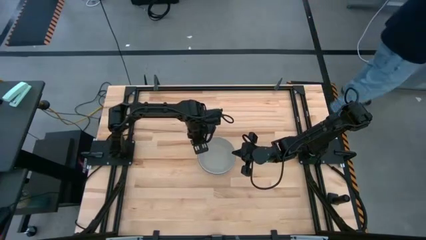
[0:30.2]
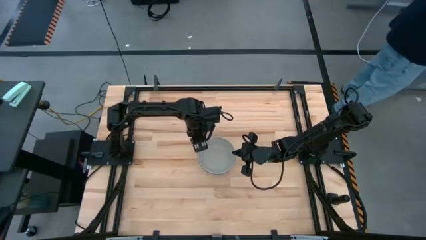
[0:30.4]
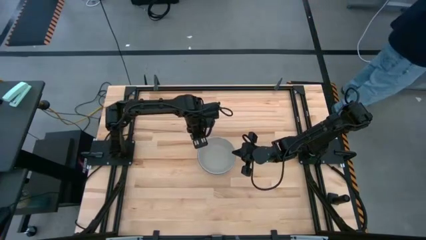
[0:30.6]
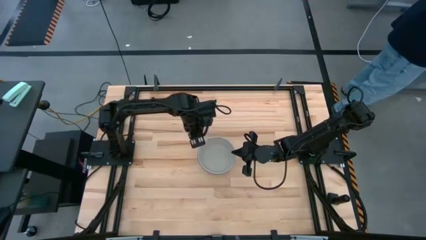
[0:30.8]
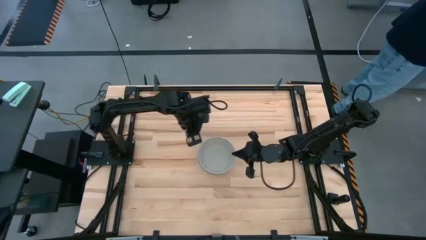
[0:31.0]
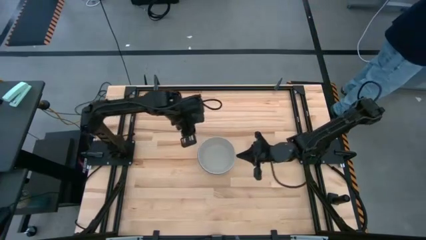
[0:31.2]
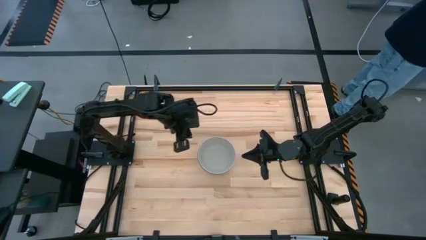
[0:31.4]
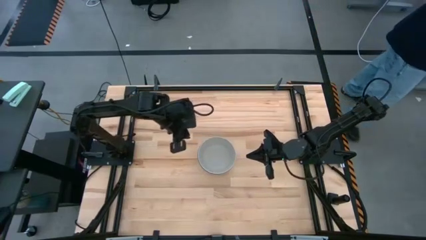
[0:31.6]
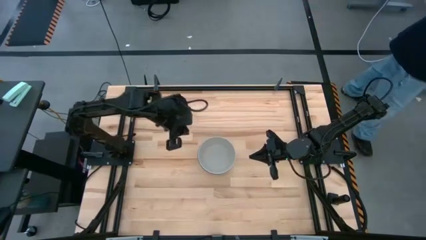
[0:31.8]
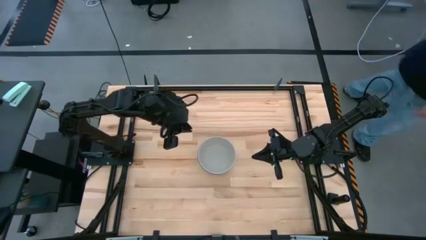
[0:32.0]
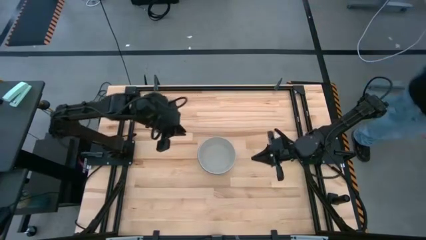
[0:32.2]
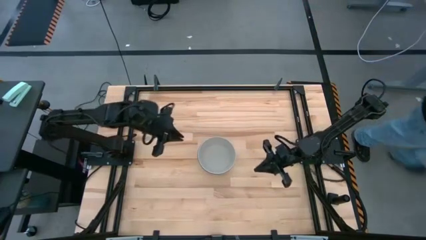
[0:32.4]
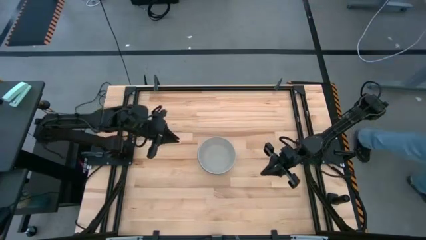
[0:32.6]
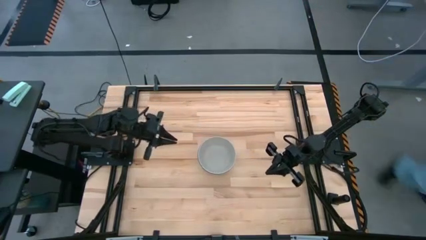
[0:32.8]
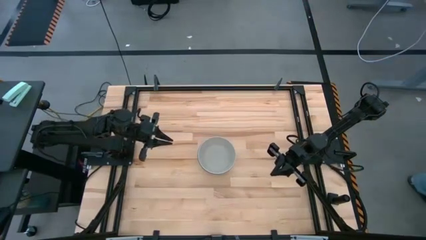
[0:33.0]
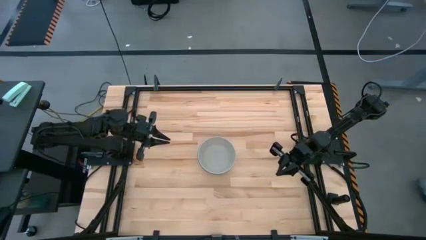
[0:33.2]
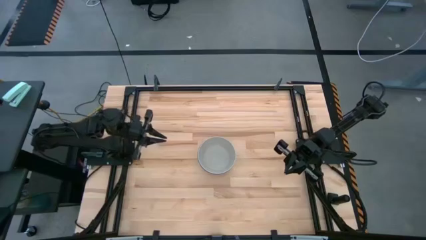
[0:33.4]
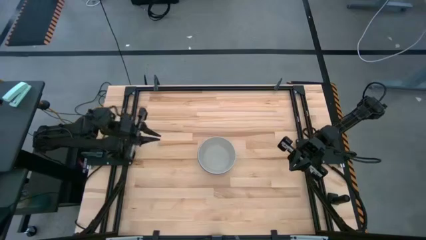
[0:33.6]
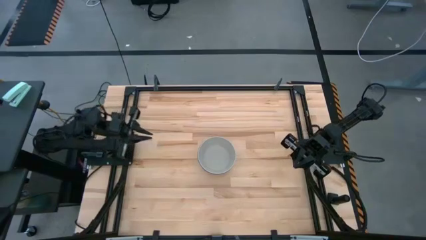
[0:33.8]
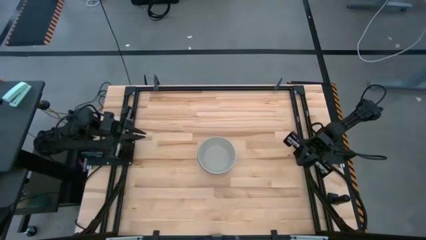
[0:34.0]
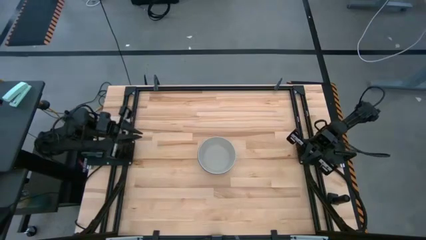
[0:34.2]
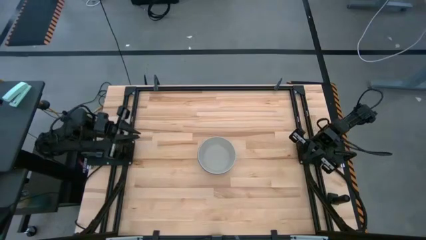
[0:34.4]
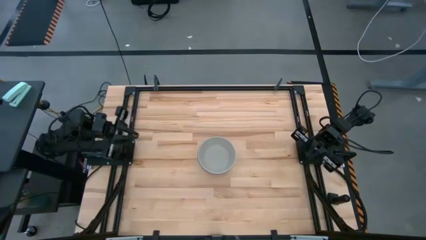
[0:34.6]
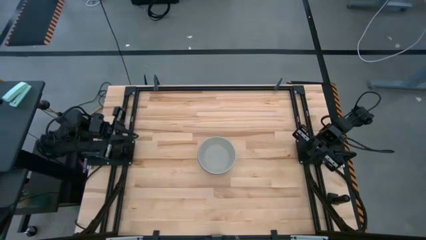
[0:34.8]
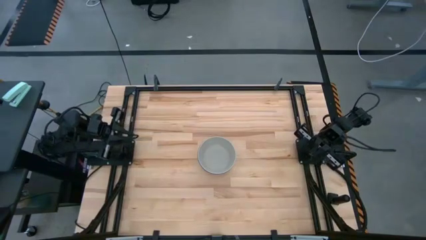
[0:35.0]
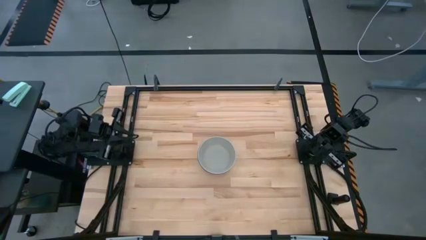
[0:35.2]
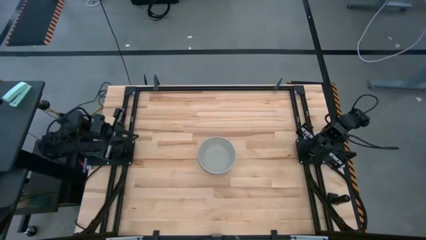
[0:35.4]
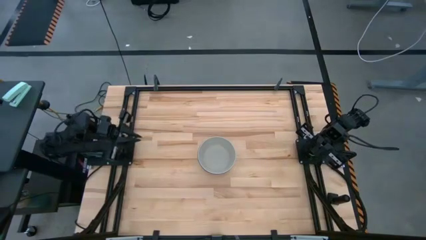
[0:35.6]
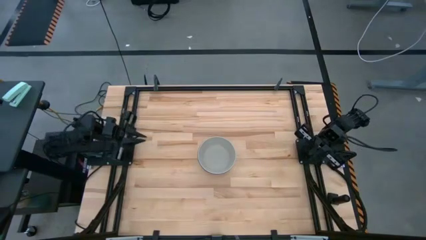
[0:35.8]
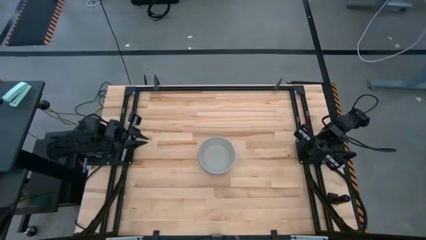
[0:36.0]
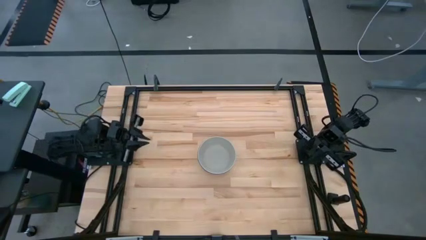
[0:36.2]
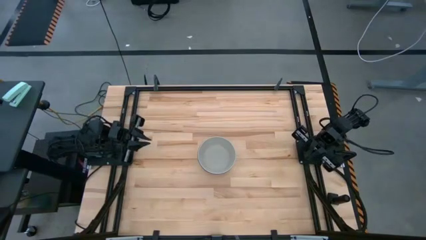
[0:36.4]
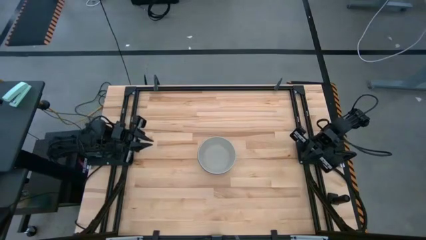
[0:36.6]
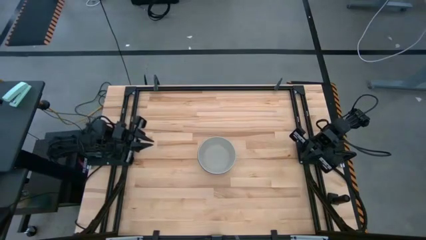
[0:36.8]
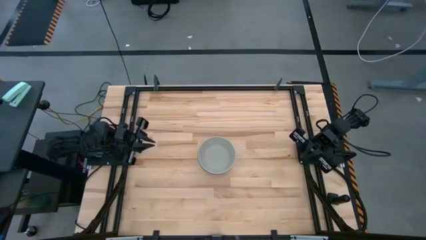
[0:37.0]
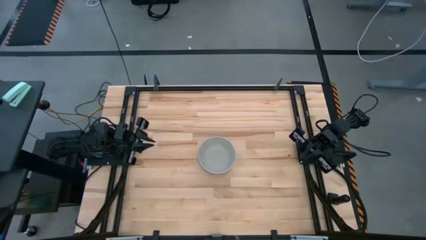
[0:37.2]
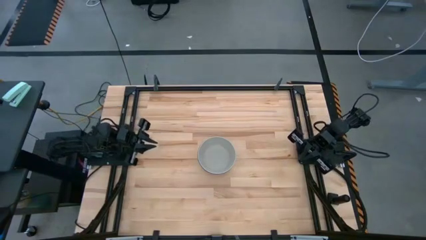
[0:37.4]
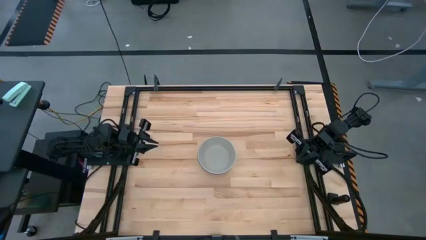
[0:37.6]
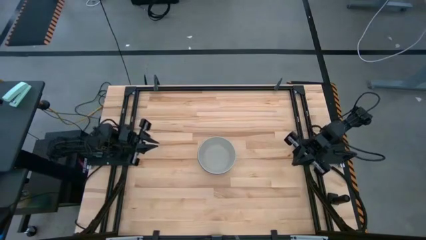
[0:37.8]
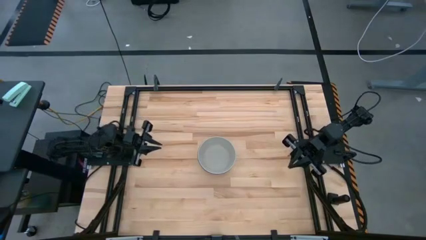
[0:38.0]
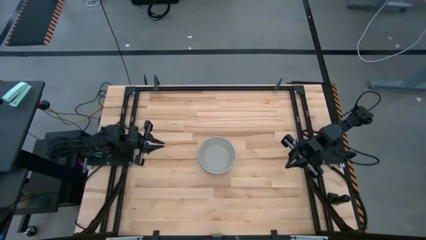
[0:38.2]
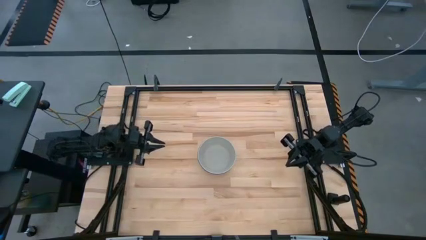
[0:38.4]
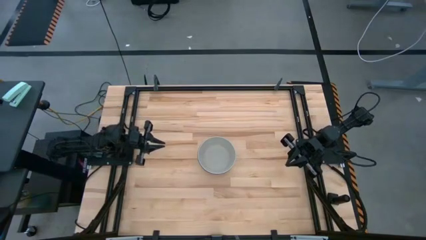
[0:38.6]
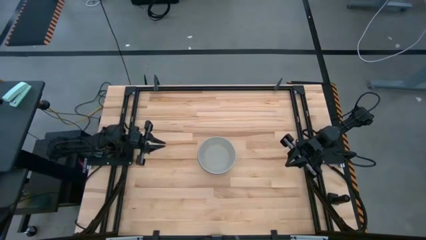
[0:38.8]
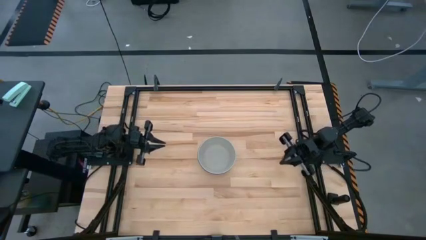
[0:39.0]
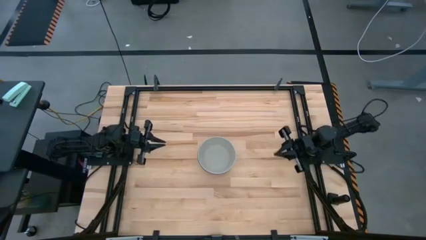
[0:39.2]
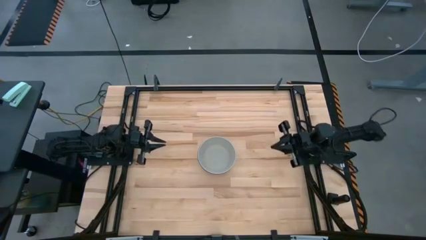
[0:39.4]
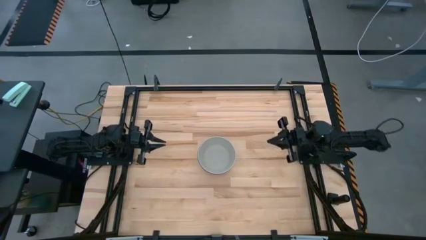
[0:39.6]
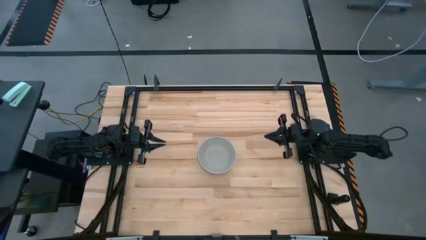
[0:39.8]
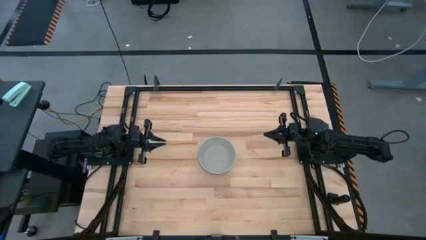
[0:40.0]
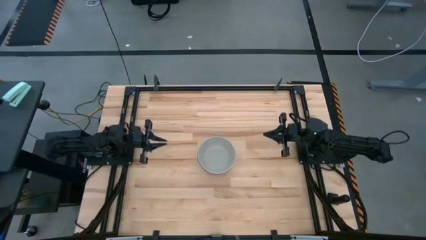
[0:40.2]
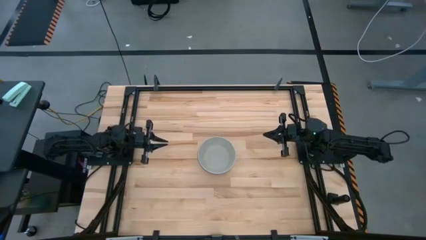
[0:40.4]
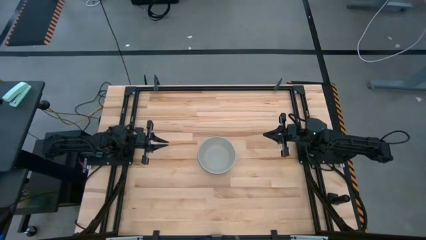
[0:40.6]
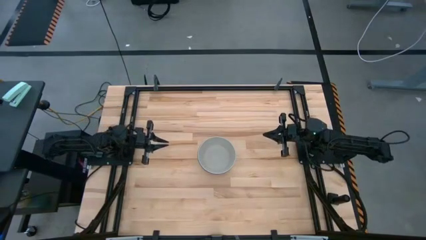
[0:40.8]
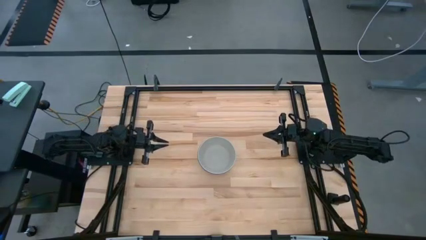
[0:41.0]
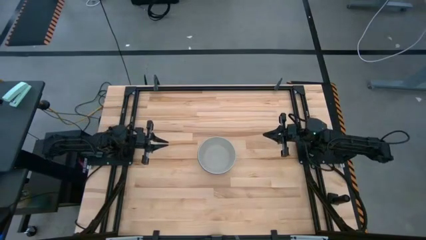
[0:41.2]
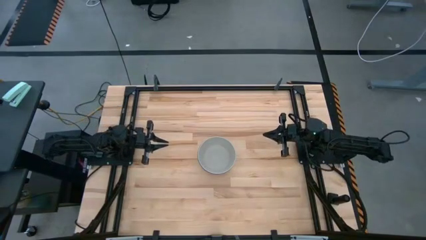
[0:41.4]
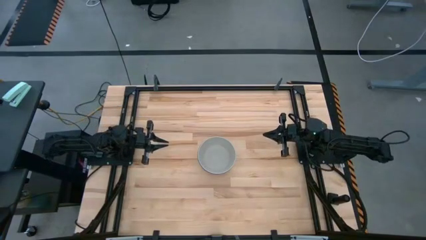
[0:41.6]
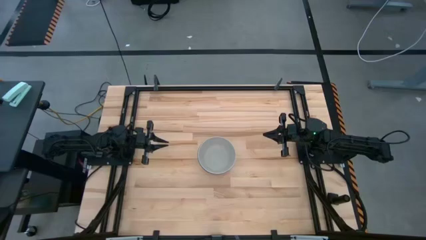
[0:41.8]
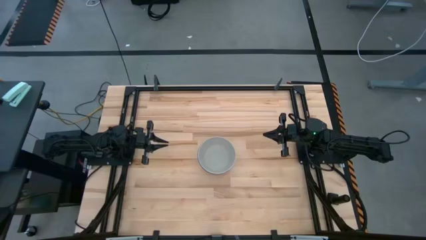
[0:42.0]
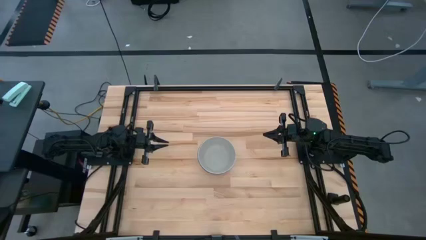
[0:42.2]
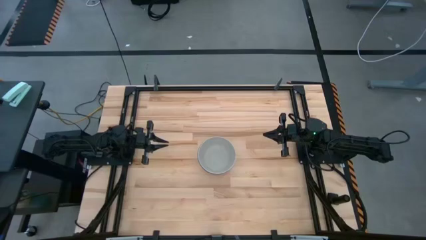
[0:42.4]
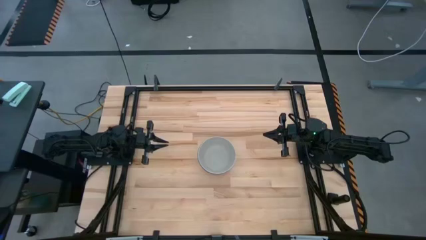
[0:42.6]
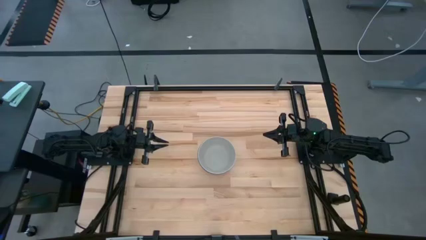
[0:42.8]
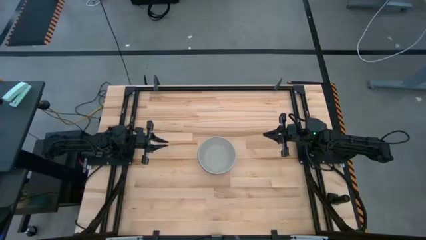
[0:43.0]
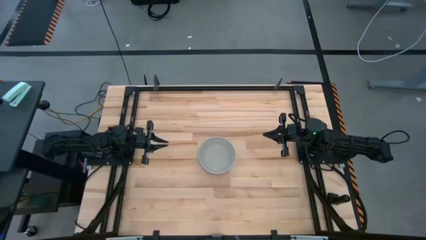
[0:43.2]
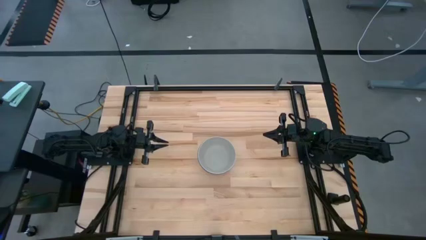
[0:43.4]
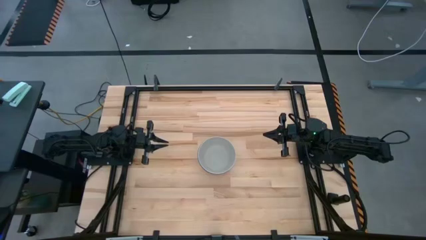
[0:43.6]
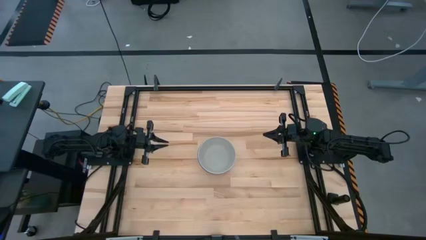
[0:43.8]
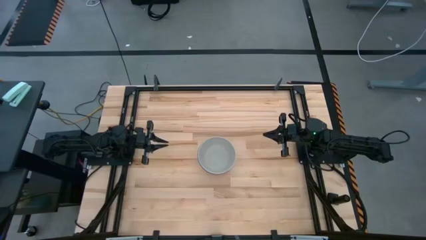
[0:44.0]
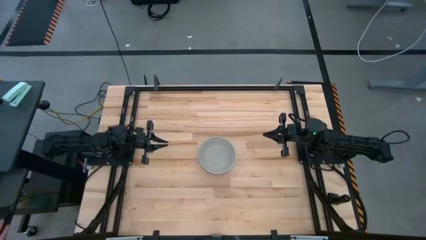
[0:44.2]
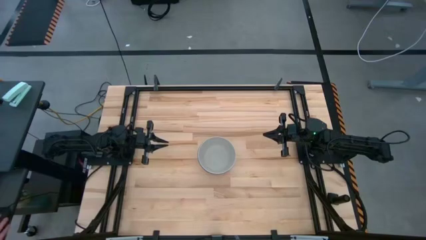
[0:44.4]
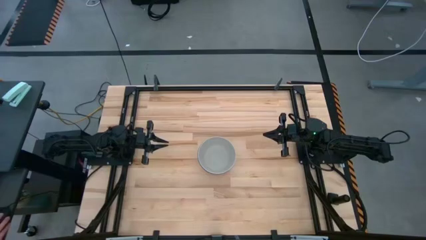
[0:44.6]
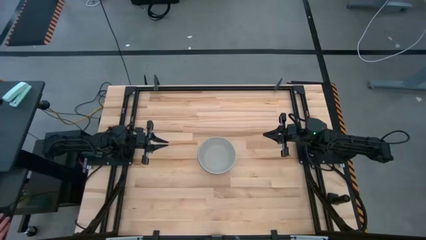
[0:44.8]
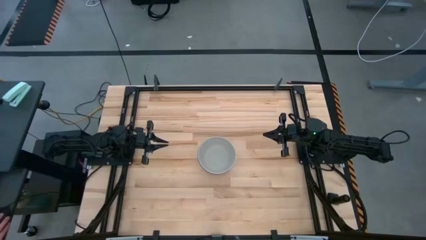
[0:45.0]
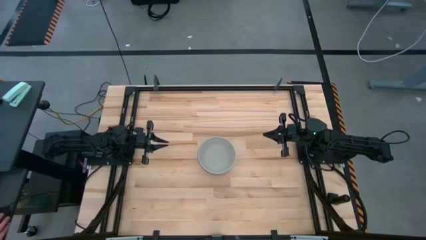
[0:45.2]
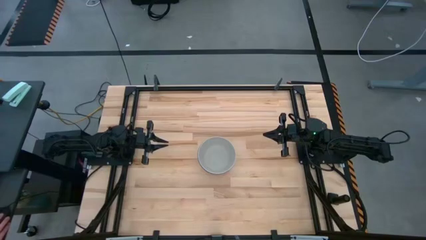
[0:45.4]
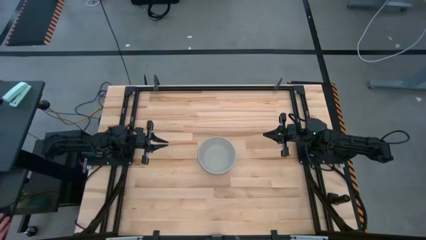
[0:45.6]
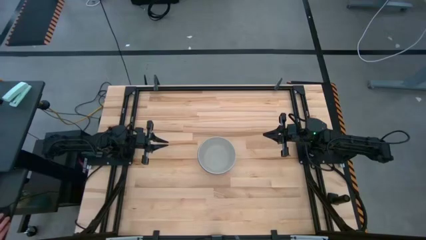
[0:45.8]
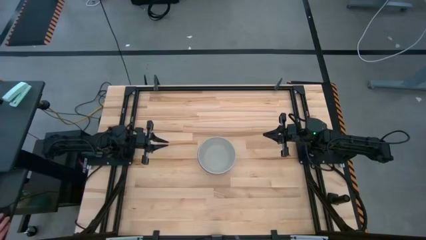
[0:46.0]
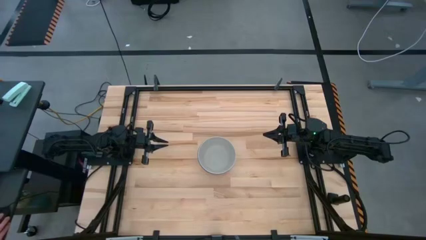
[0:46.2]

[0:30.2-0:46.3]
Task: Nest bowls inside each other
Return to home position
